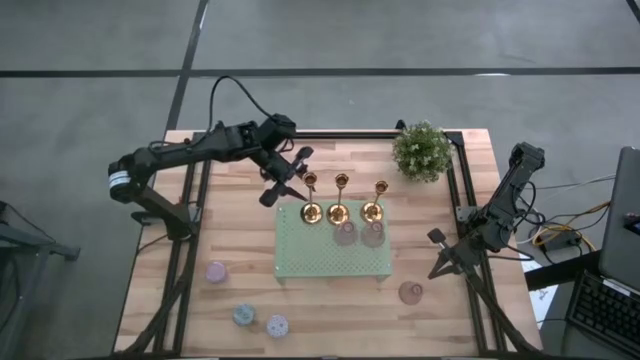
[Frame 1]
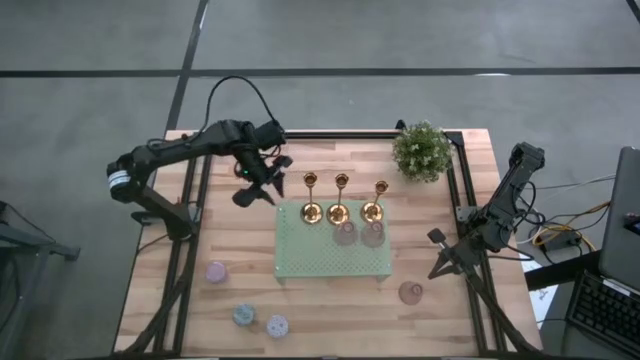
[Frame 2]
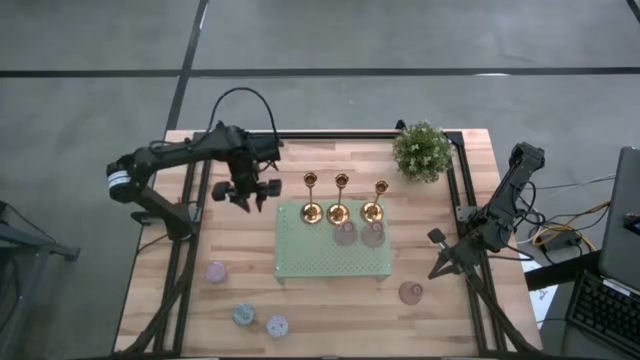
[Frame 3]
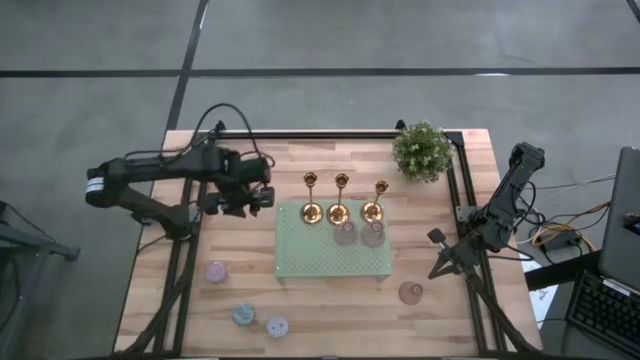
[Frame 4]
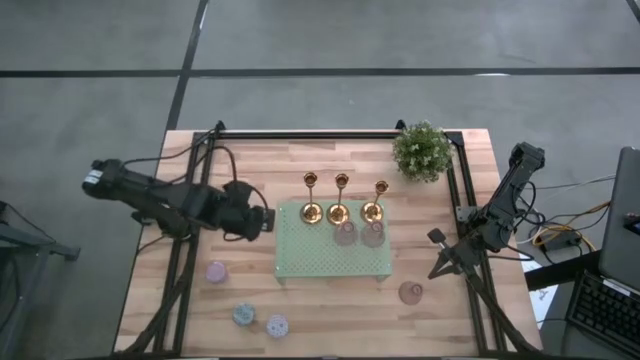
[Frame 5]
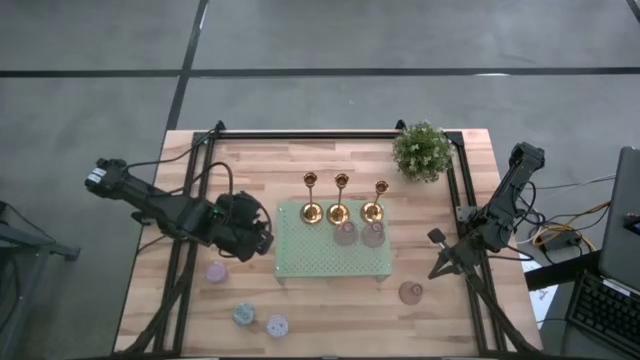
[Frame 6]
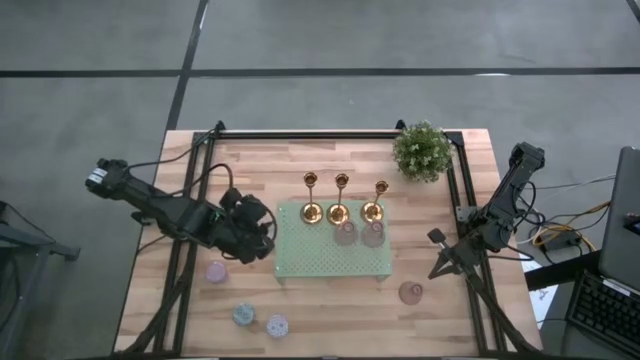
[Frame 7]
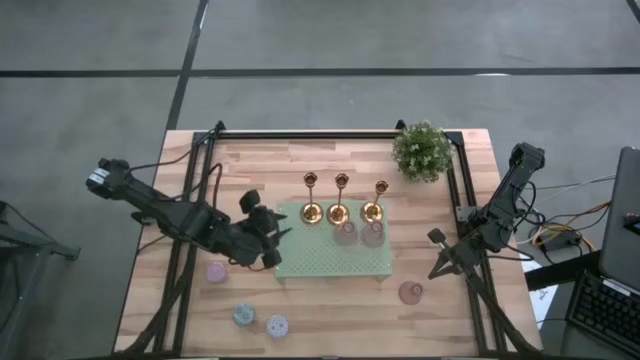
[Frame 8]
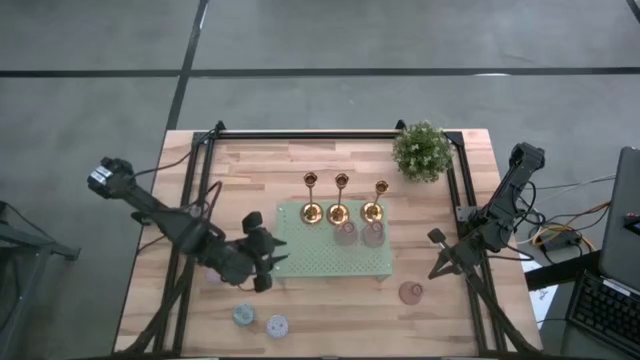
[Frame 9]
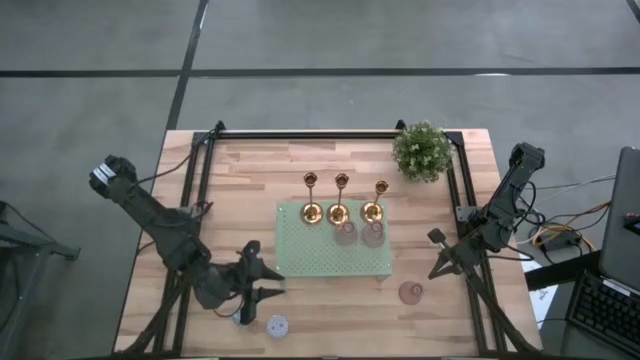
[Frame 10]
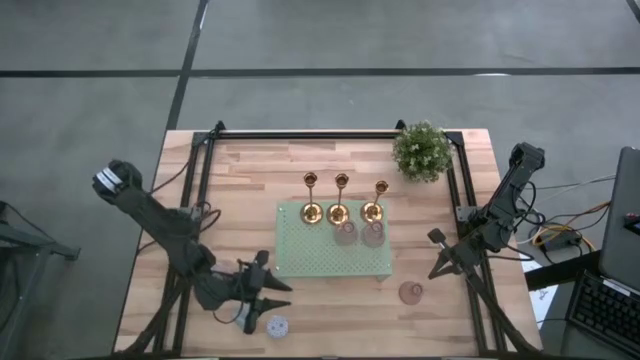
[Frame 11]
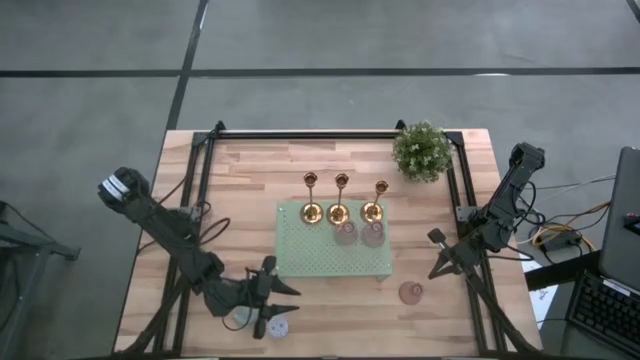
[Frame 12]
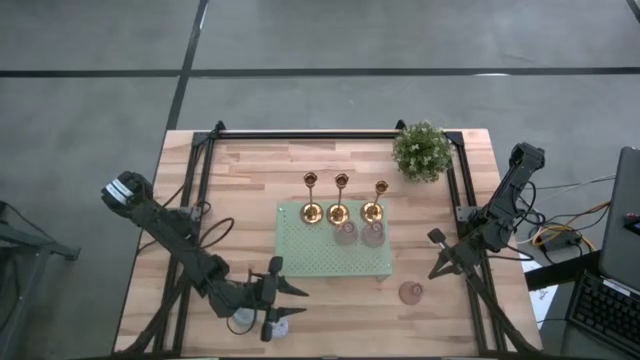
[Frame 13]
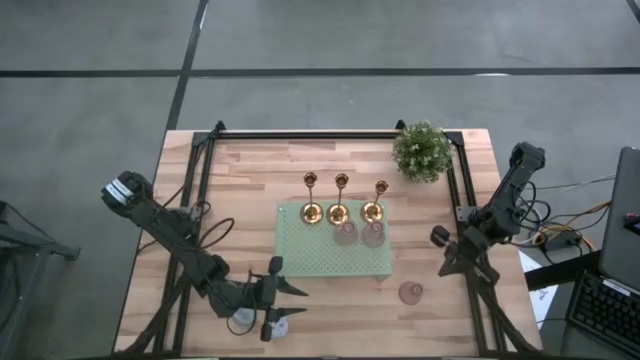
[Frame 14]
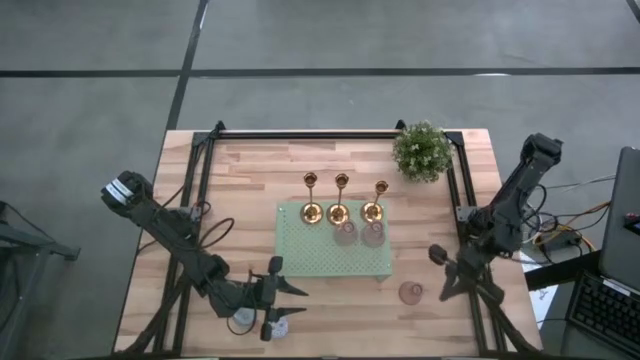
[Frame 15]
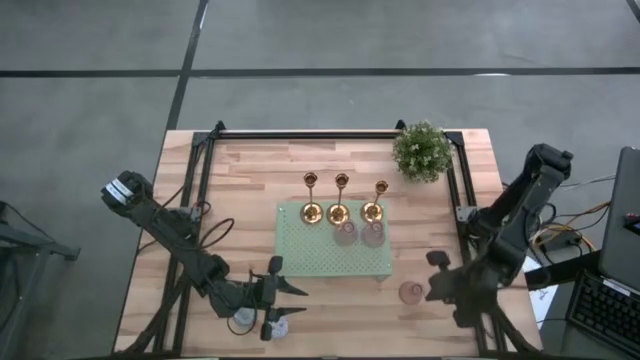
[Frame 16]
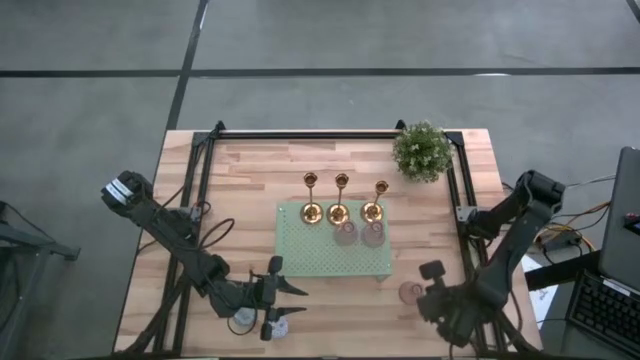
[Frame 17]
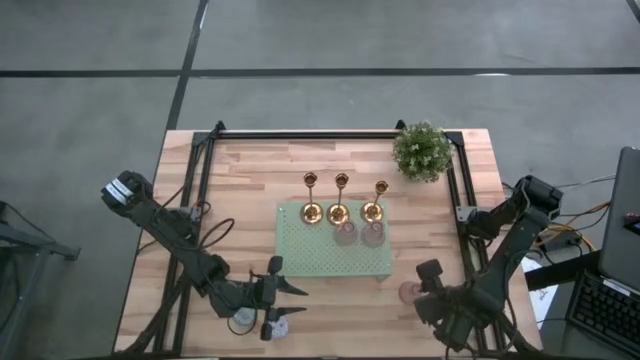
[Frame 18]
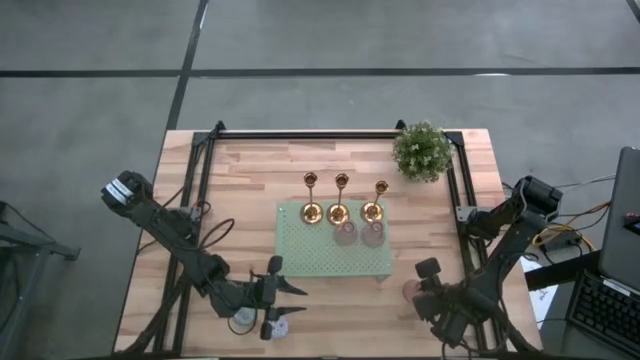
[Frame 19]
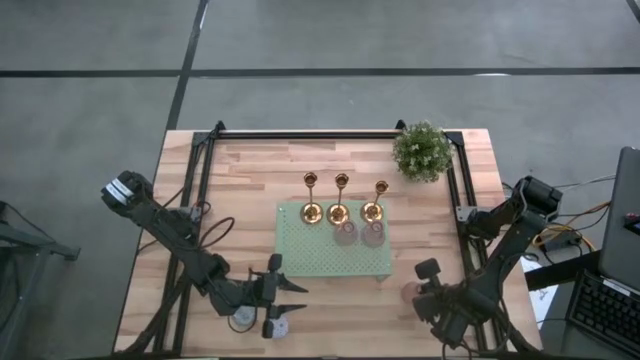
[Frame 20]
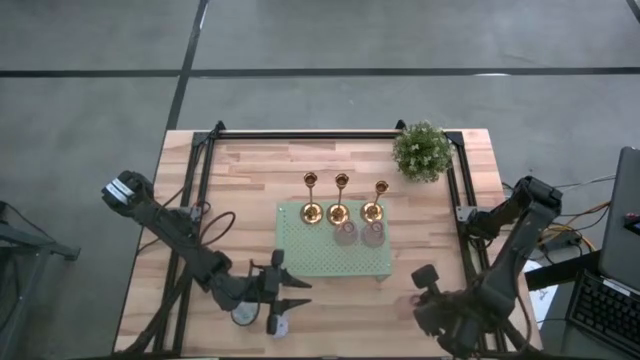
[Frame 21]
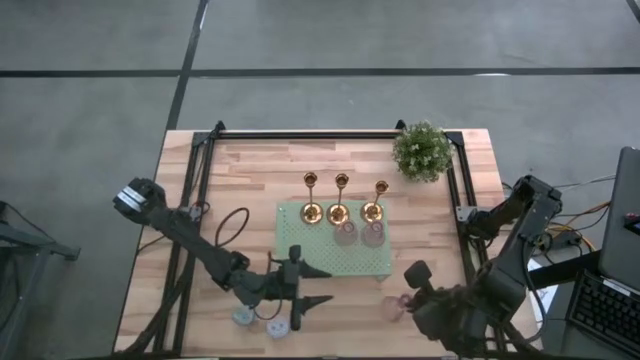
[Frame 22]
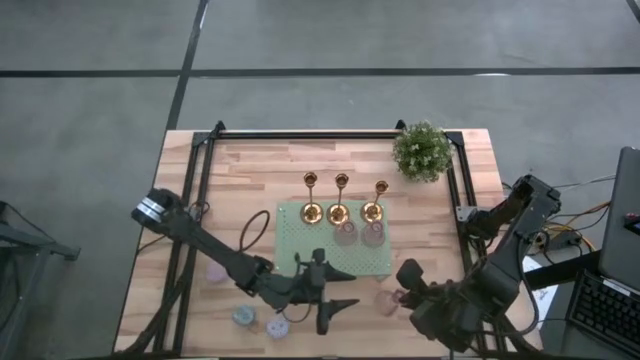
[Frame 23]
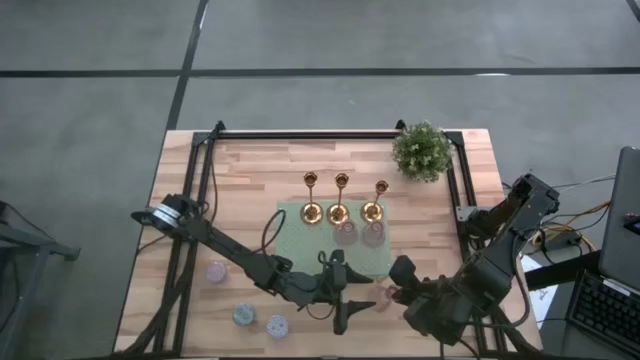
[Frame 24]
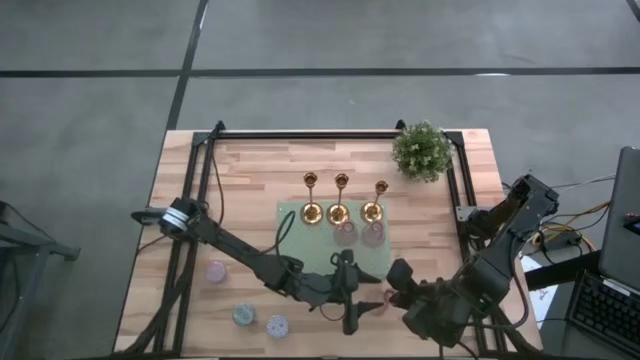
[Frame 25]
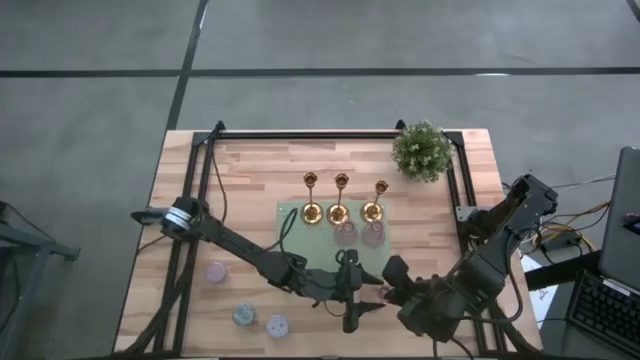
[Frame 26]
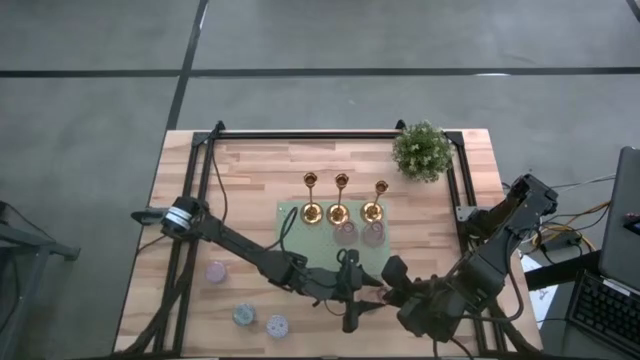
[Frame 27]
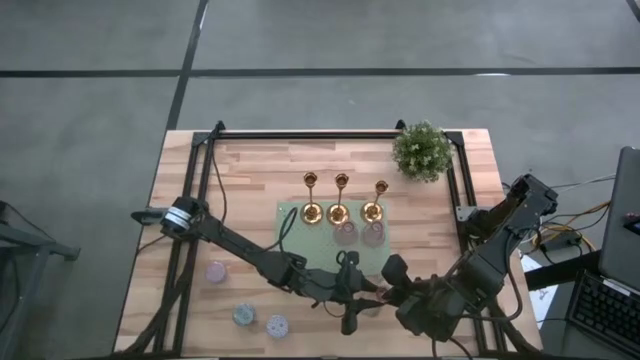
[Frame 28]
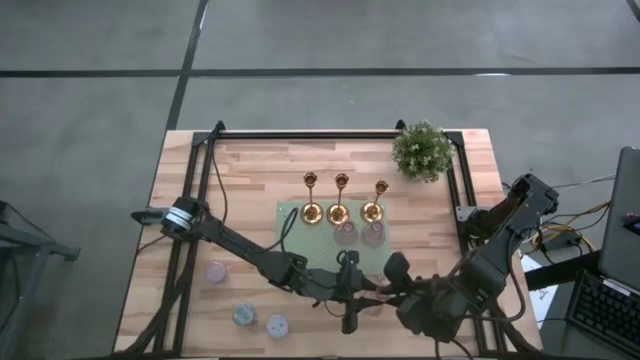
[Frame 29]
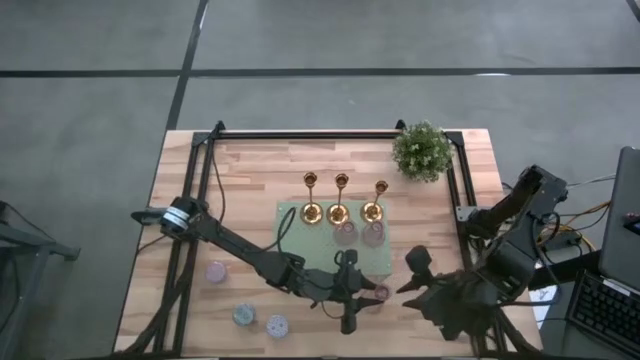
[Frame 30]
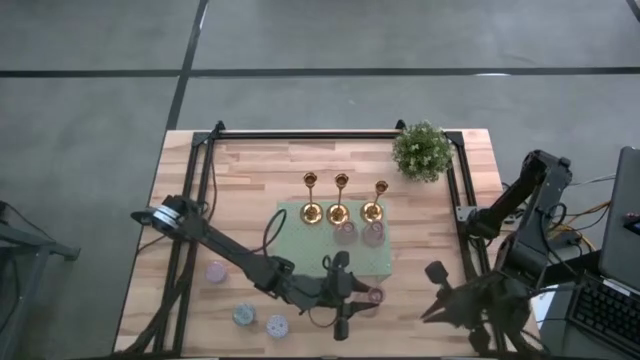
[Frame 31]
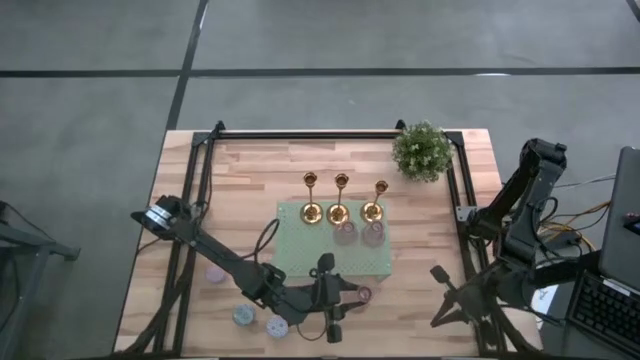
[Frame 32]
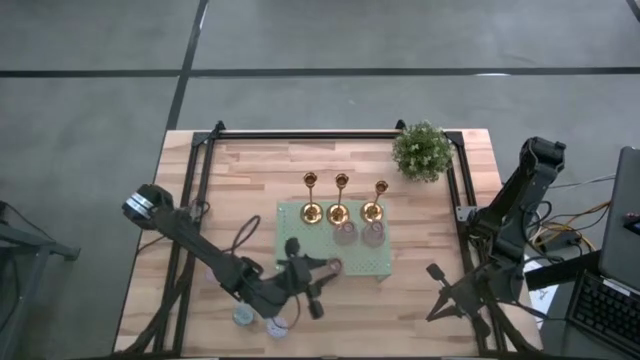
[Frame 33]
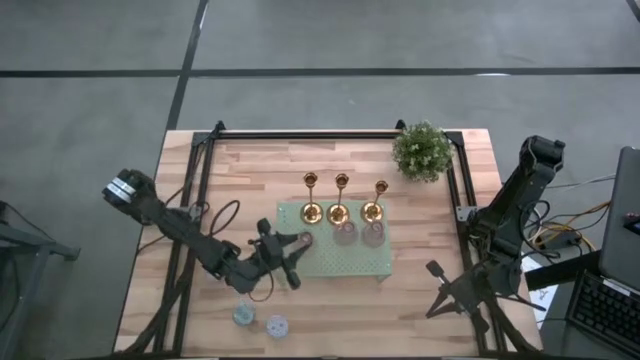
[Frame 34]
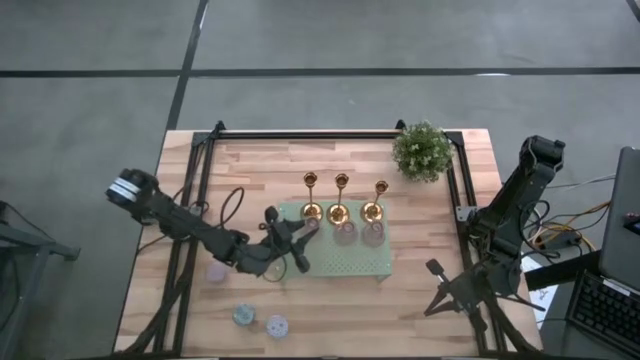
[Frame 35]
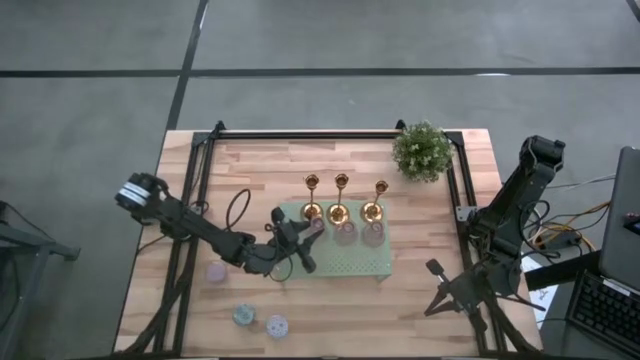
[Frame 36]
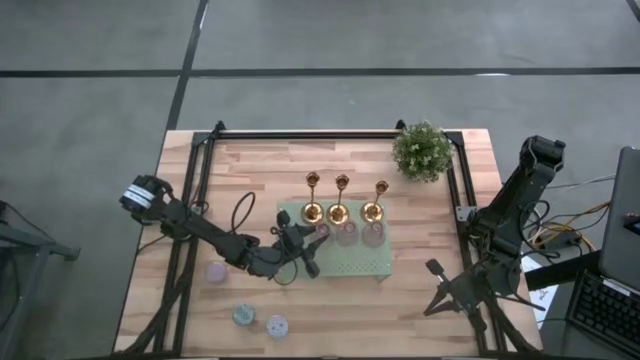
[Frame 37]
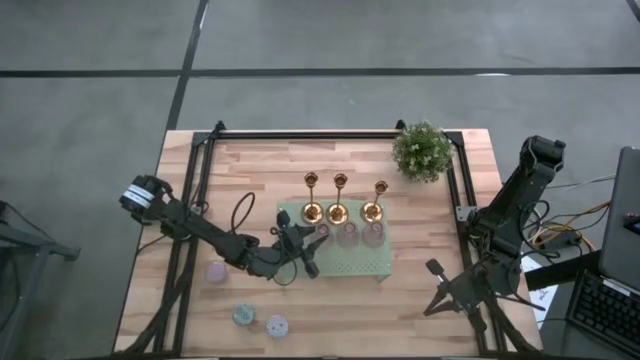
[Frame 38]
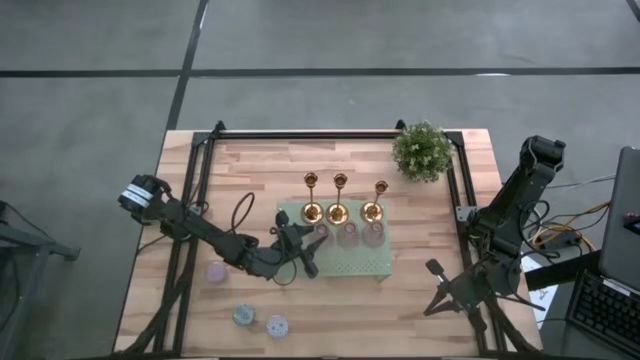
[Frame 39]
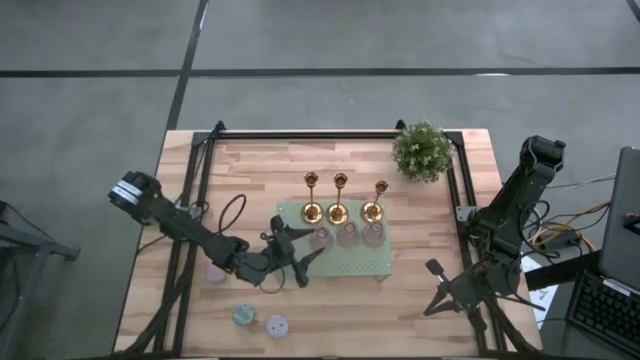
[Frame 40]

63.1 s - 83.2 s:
Task: Pick & Place candle stick holders
Put the pink glass candle holder on the shelf

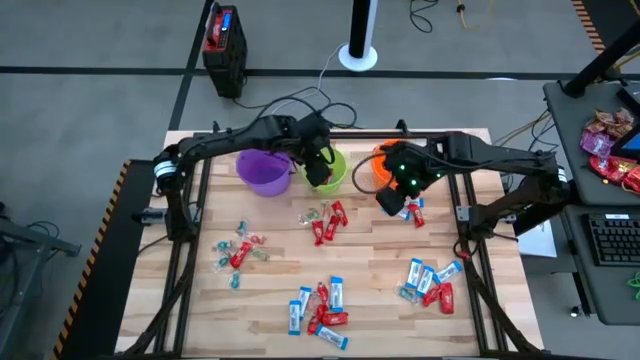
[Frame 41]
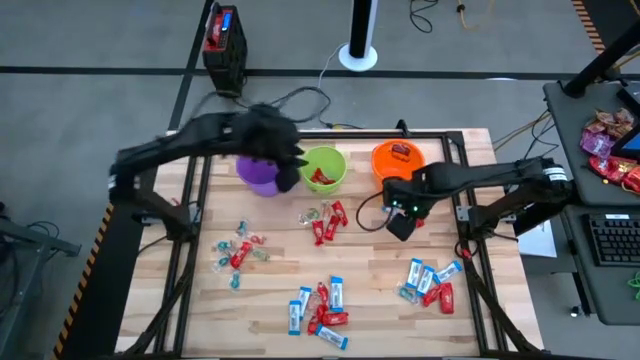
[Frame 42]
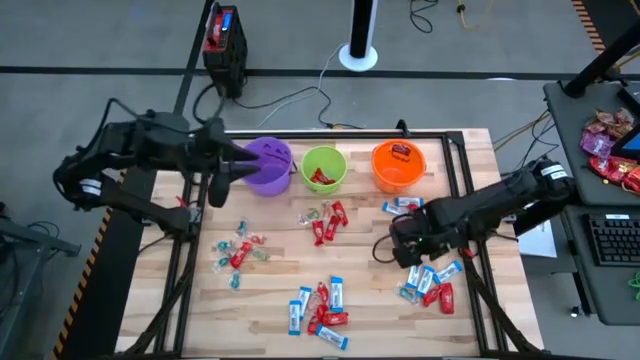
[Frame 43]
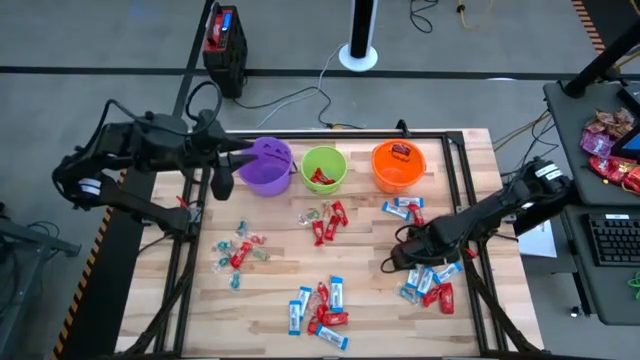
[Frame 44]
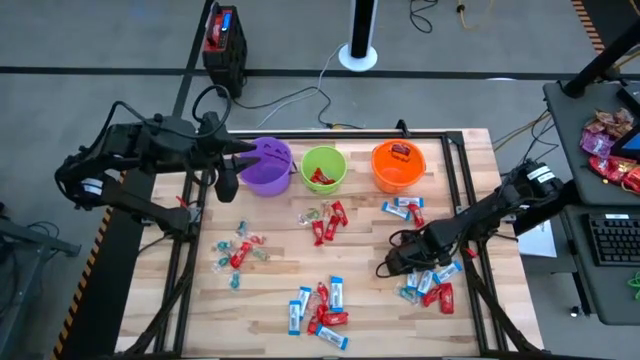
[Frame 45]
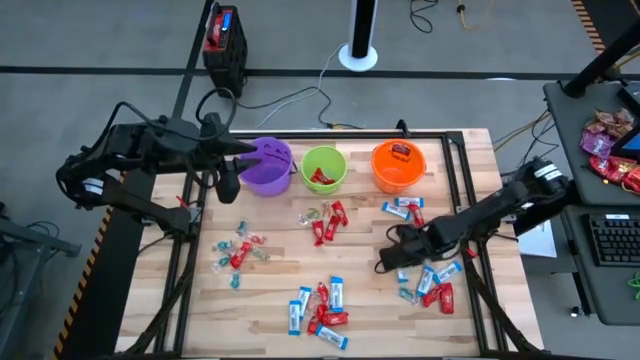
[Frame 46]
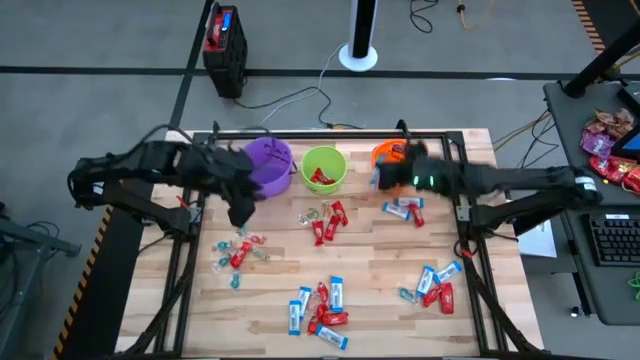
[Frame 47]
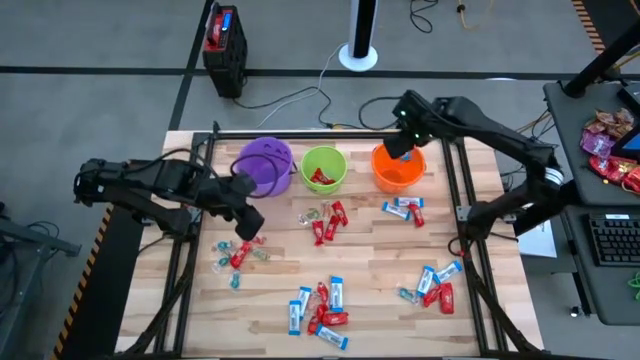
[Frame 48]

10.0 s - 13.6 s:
Task: Sort candy by brand, put in halloween buckets
Put the white chocolate bar into the orange bucket
